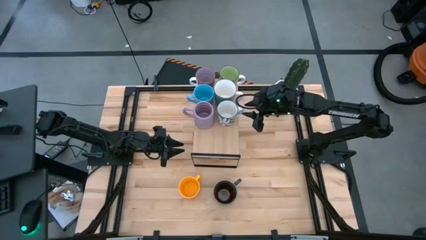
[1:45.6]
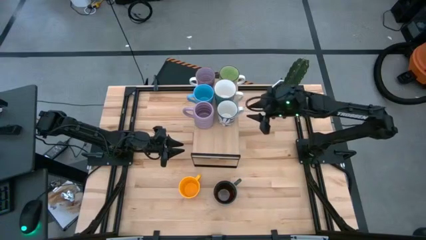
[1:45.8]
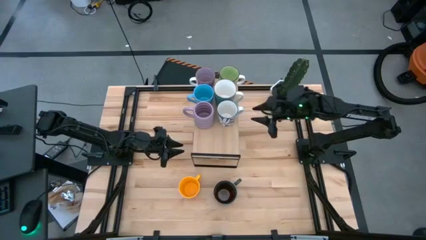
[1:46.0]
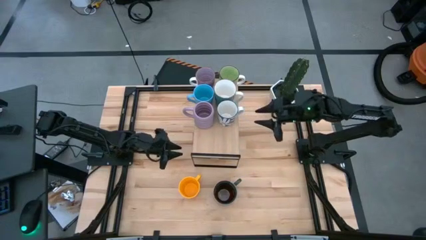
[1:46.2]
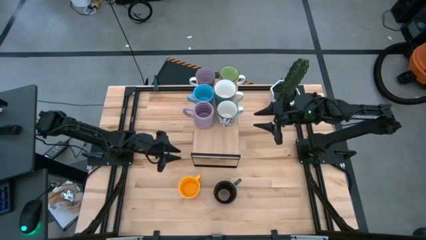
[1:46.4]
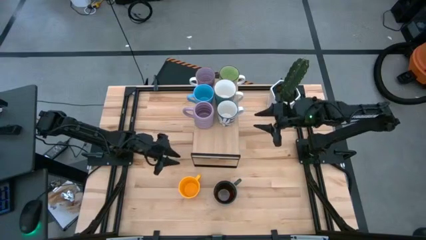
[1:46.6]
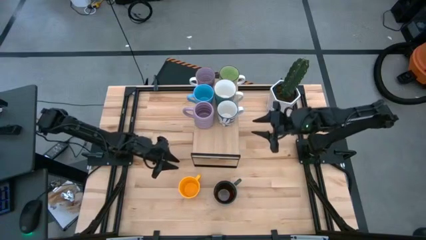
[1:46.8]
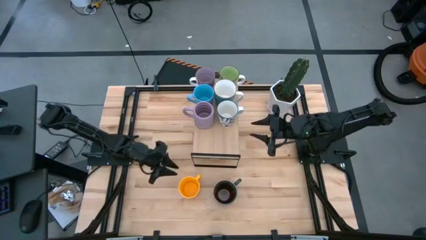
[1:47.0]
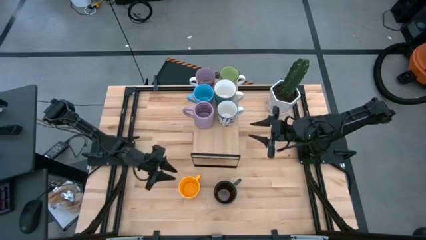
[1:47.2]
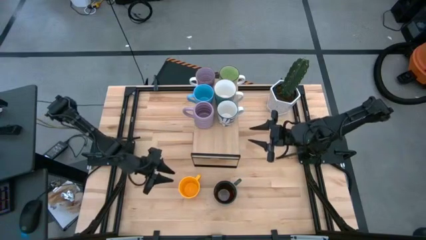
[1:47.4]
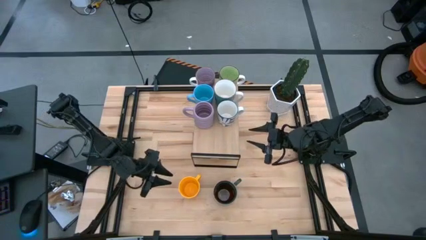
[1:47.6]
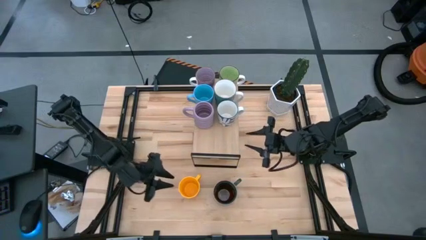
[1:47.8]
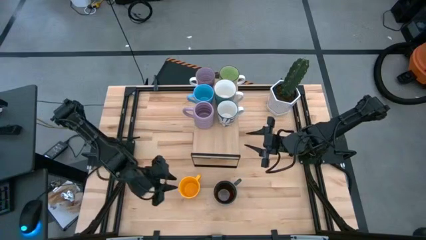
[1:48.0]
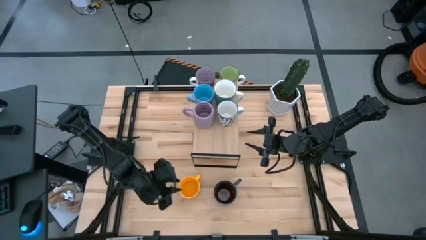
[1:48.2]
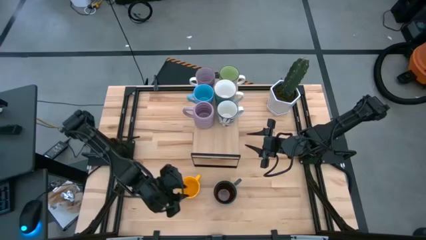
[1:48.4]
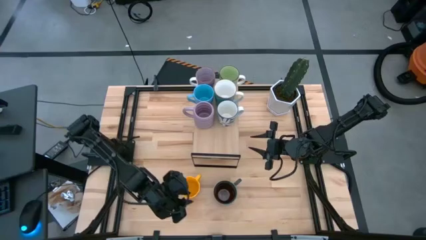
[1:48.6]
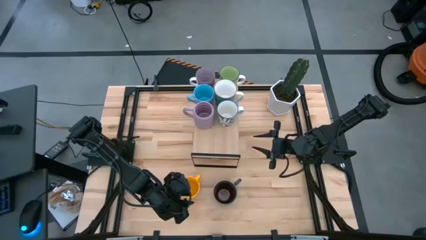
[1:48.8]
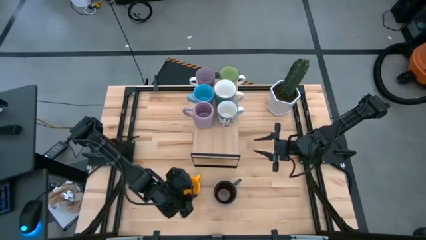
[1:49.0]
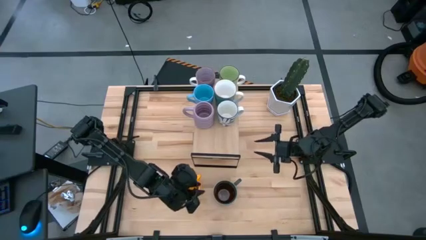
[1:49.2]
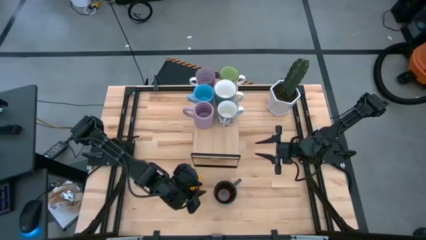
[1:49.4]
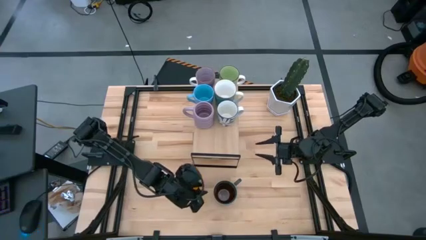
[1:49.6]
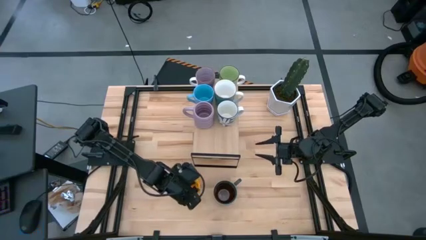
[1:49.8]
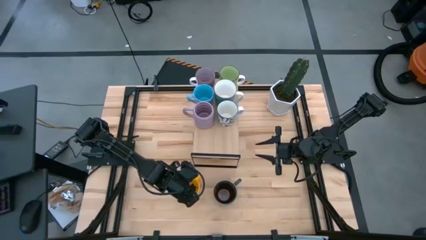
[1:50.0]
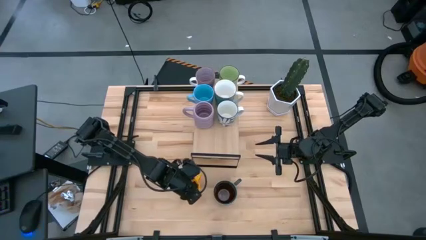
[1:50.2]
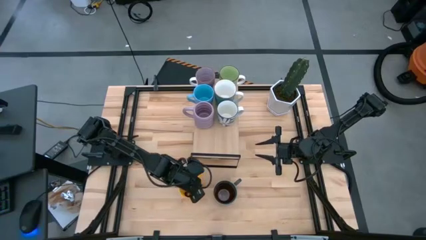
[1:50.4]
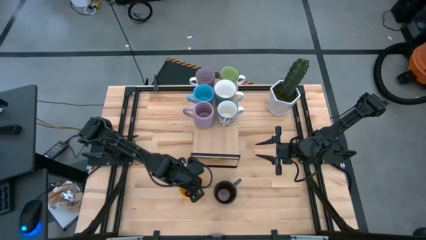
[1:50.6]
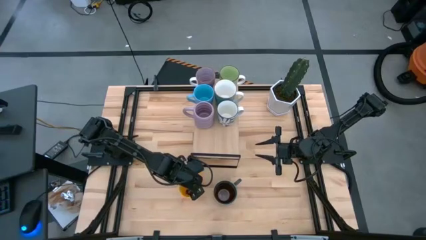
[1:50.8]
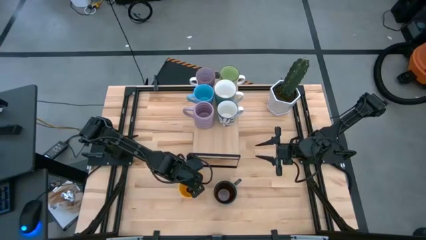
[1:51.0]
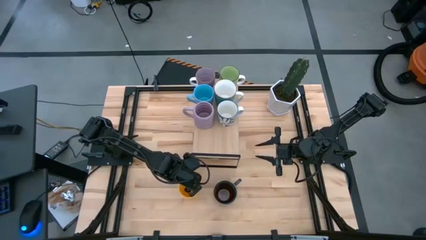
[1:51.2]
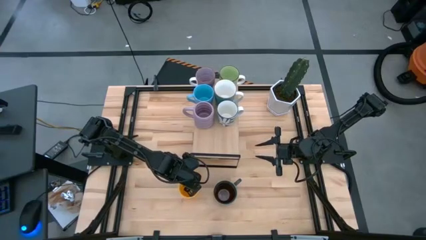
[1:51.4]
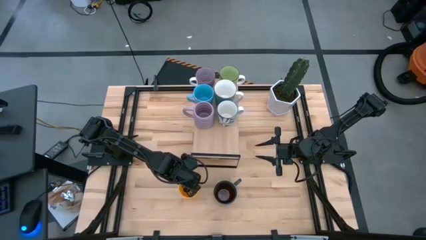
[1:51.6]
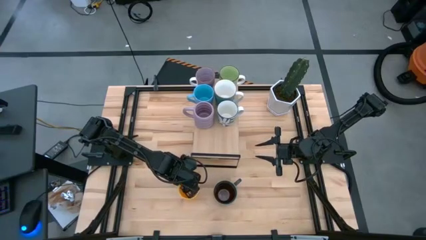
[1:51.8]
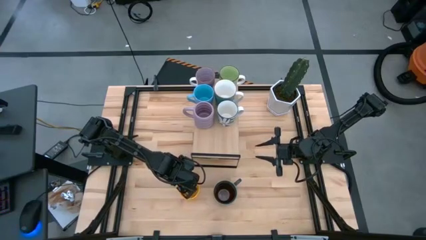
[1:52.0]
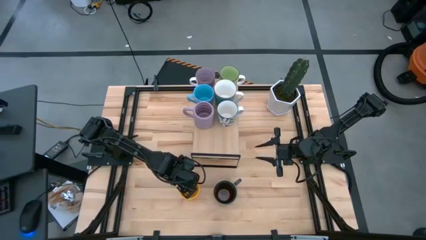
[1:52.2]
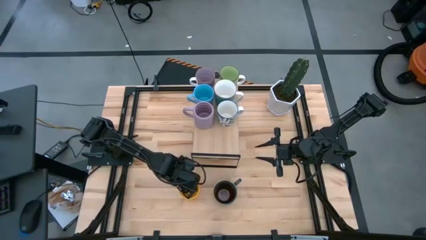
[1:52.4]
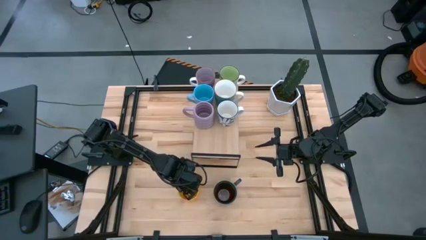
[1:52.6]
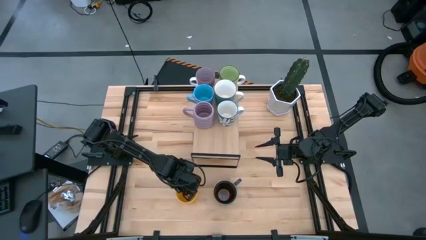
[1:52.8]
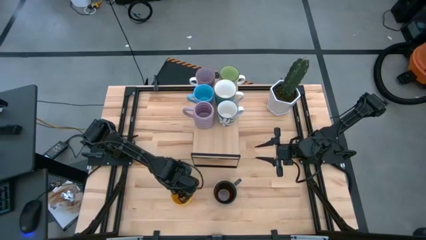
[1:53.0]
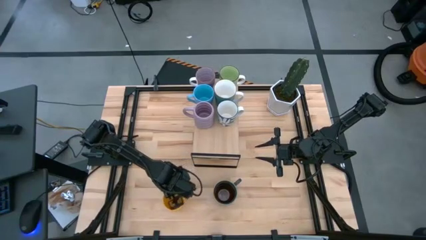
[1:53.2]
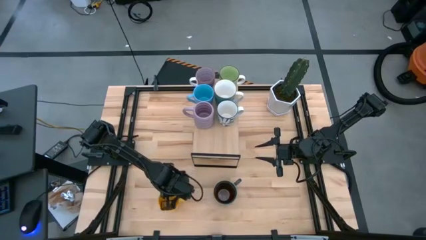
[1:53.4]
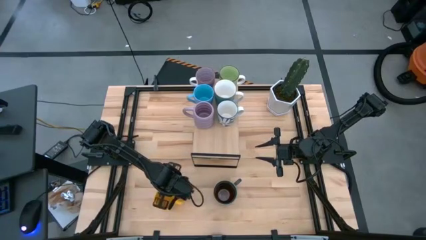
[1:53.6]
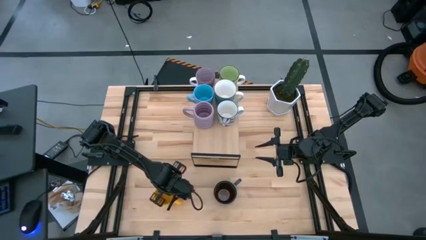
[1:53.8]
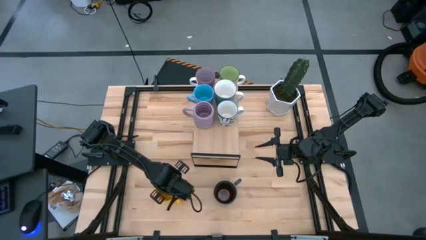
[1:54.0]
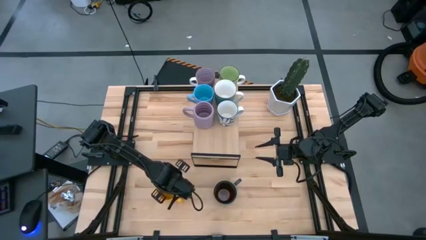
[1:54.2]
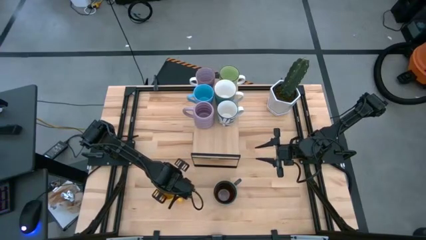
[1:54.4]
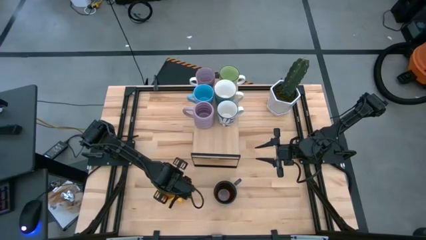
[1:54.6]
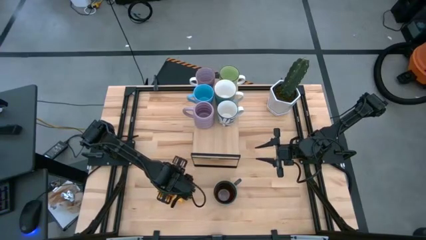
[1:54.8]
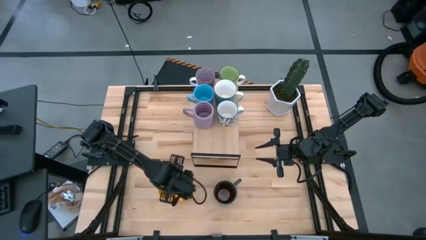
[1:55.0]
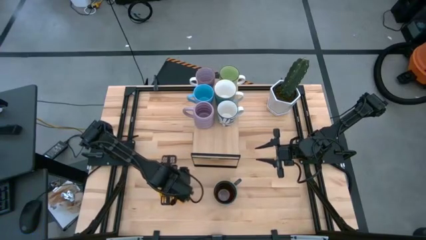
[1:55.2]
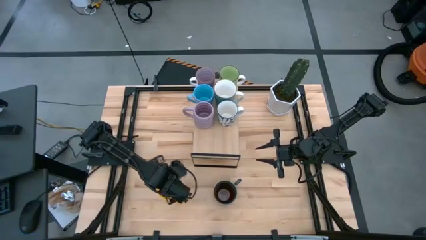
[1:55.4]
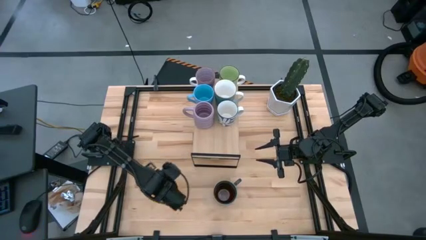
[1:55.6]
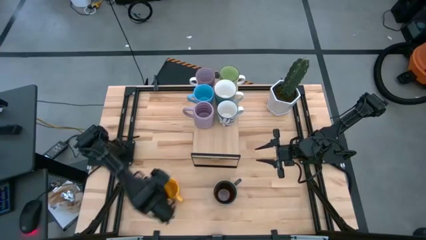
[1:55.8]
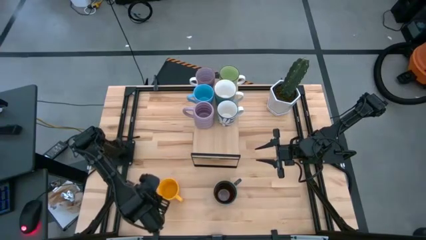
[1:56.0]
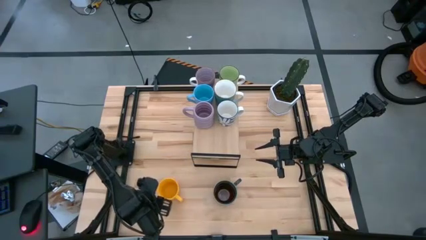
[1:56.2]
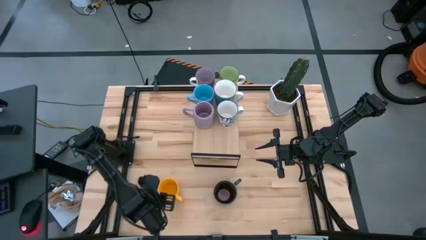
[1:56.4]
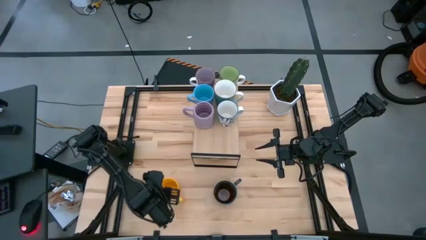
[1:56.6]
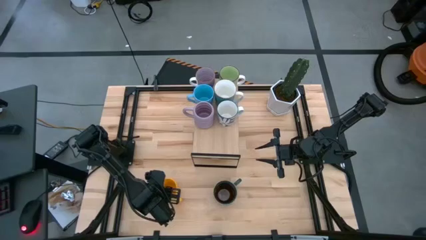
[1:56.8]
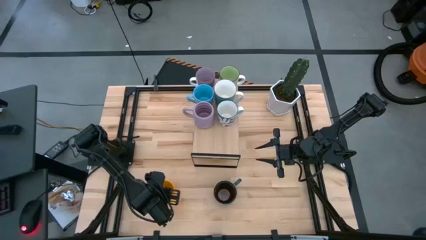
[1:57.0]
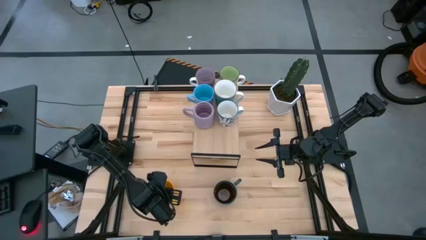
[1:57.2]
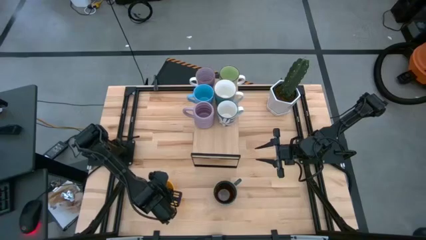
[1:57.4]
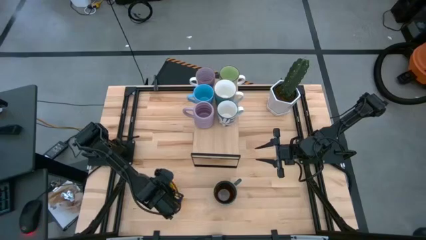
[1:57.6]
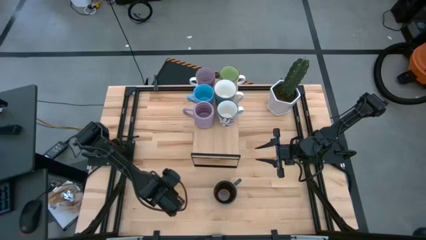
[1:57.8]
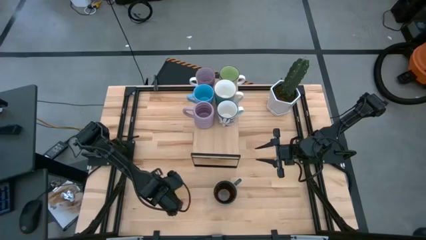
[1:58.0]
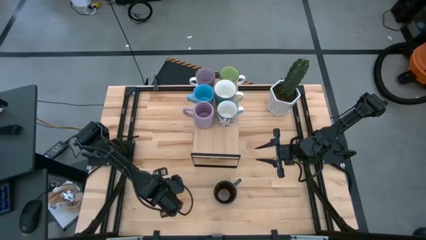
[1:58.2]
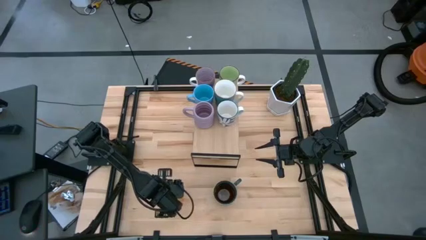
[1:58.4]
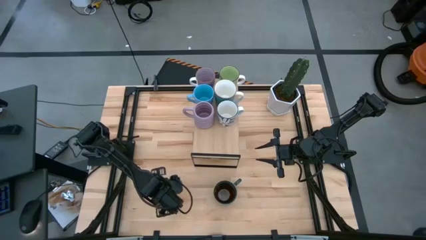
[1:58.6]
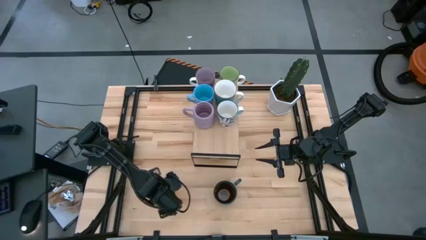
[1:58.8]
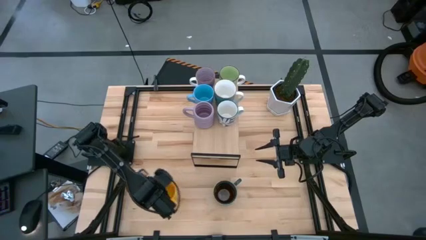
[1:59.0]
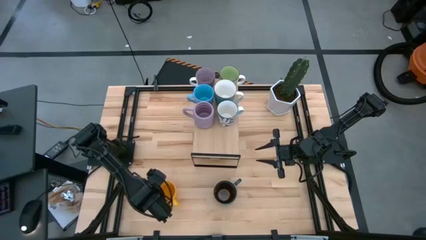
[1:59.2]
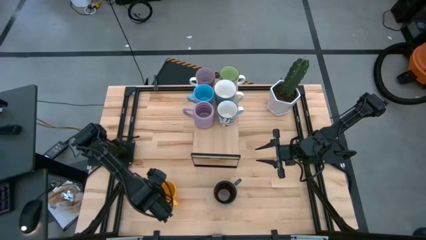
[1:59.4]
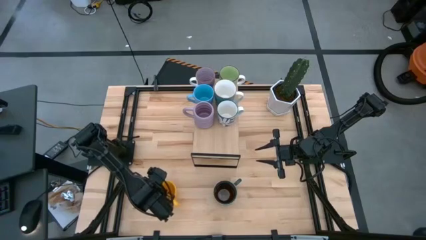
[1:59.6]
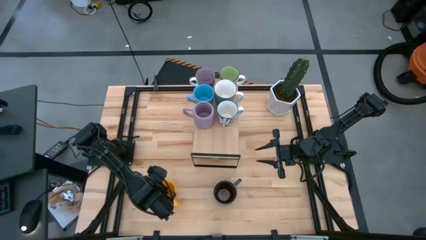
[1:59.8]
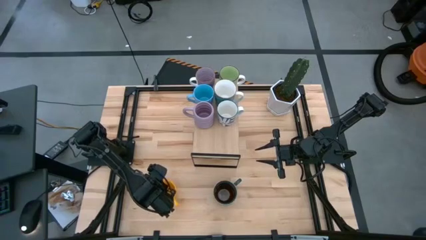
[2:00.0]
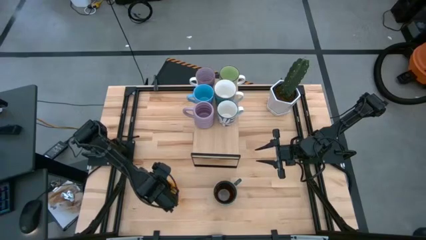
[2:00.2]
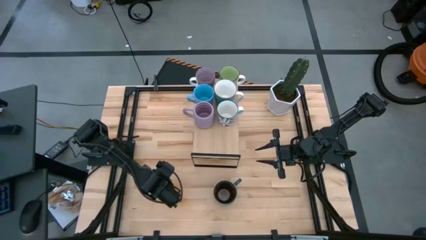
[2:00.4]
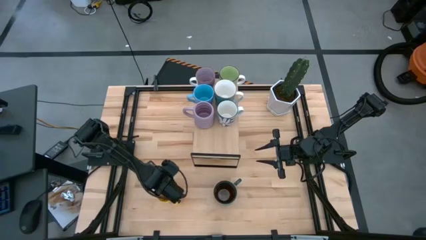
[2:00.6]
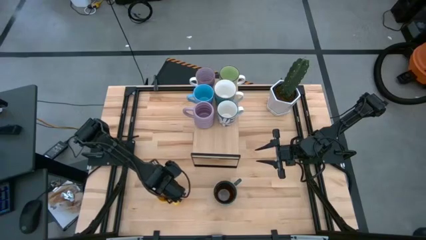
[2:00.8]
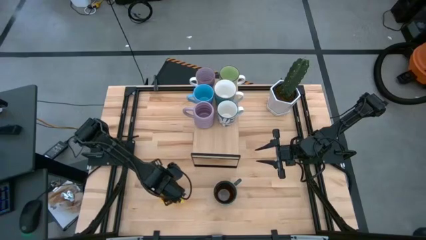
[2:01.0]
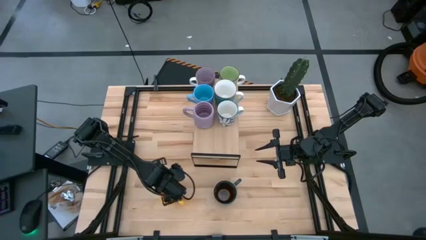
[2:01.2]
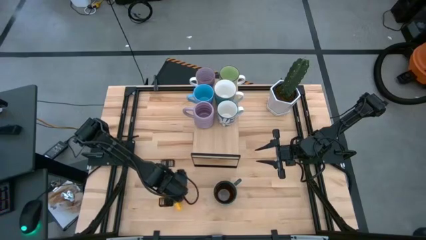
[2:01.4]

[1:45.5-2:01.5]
Task: Place coffee mugs
Put the yellow mug on the shelf

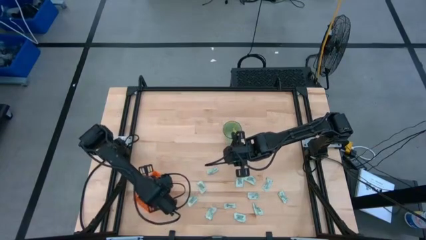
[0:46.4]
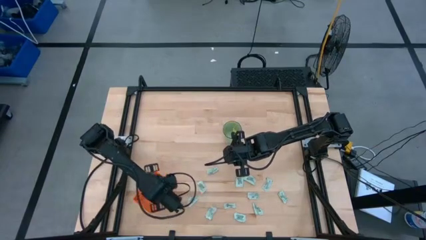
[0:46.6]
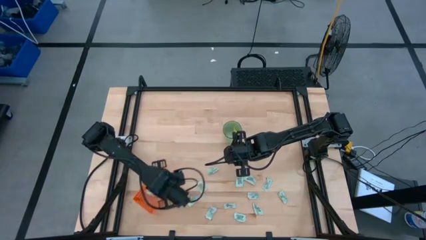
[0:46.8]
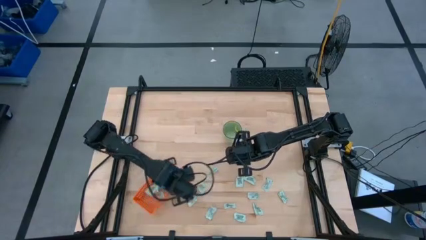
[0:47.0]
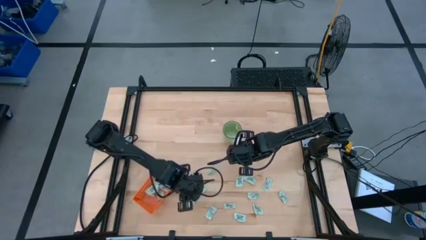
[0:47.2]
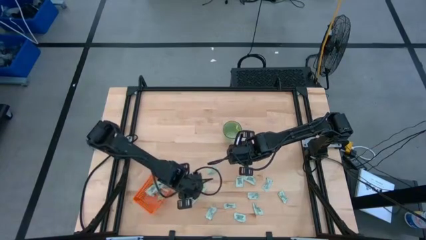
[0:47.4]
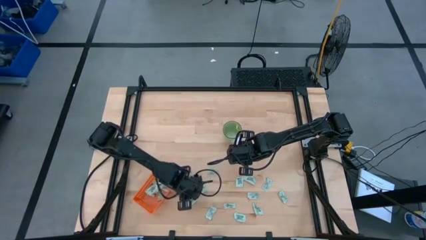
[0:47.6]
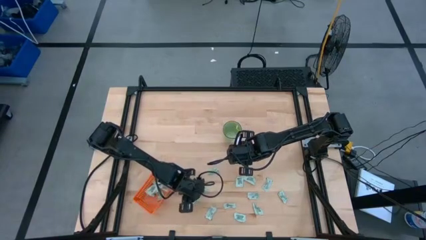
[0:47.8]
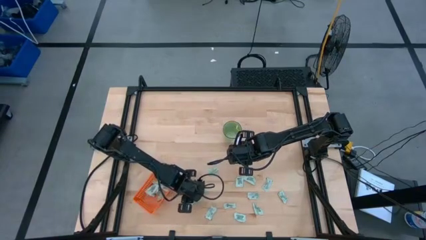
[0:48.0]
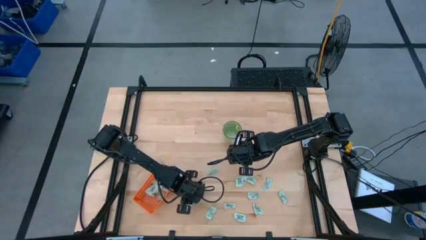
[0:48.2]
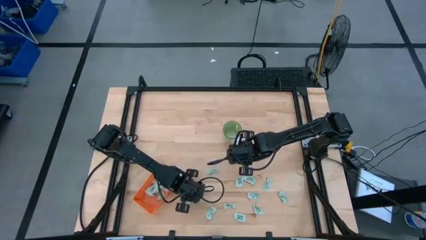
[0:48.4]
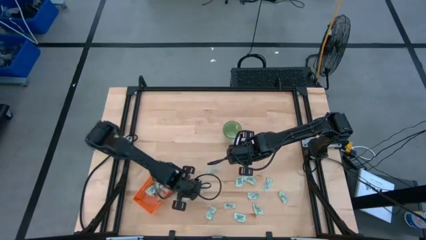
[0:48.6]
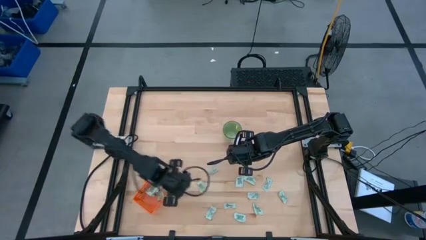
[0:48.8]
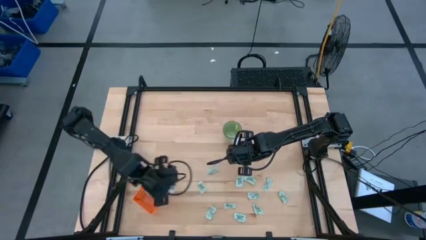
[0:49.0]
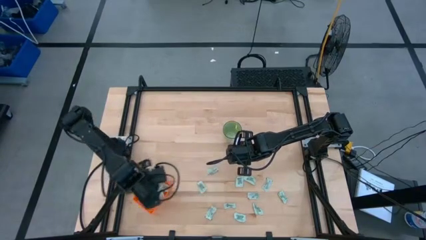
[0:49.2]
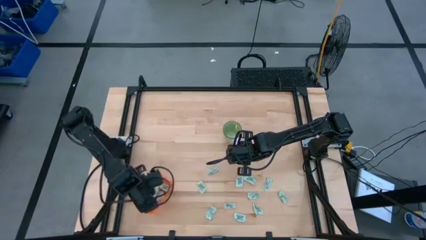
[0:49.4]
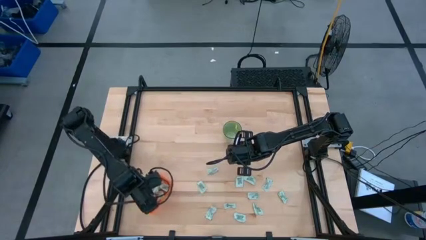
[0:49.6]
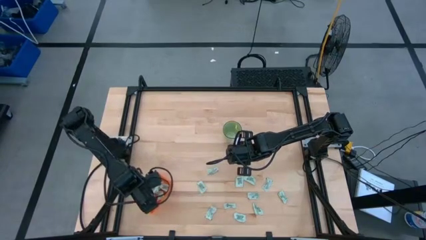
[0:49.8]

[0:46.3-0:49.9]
Task: Pick and place Stevia / Truvia into bins
Put the light green stevia packet into the orange basket
